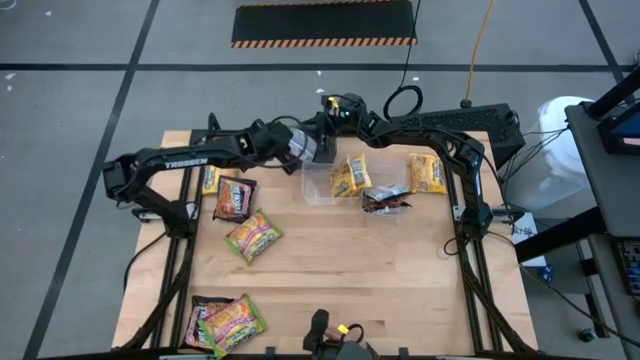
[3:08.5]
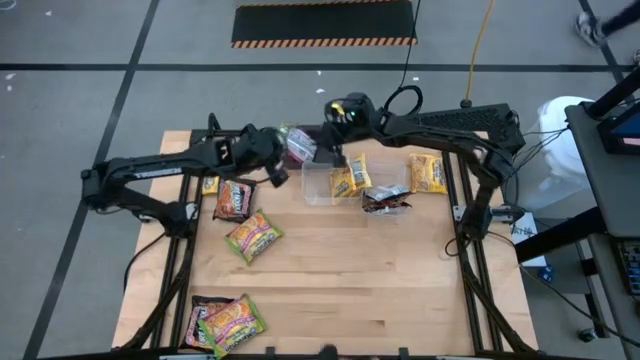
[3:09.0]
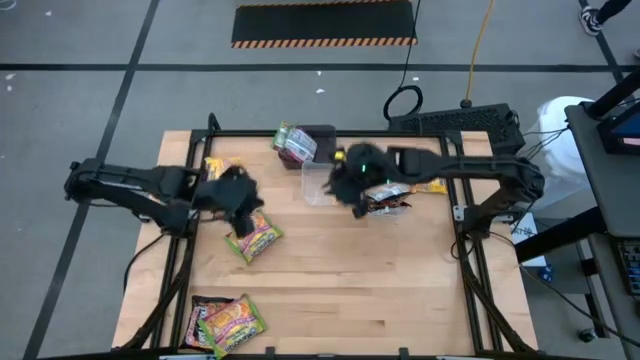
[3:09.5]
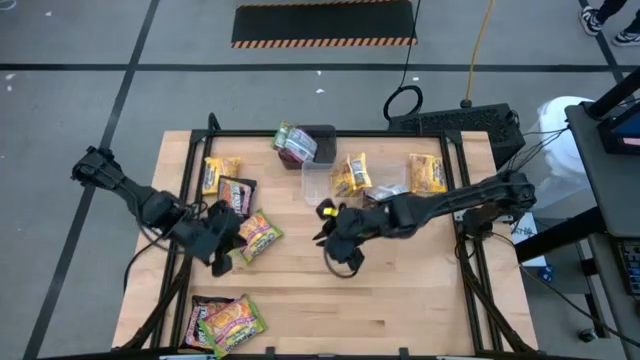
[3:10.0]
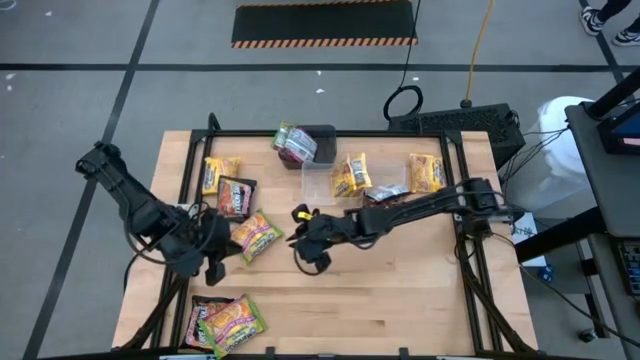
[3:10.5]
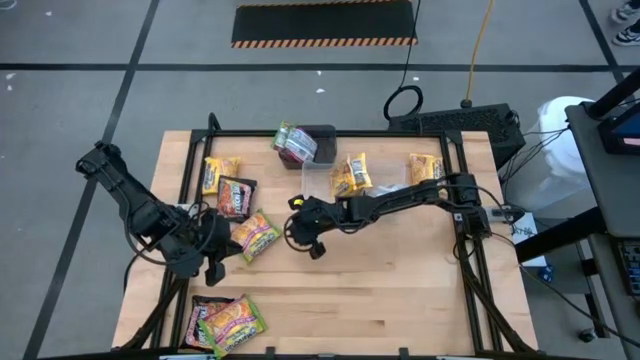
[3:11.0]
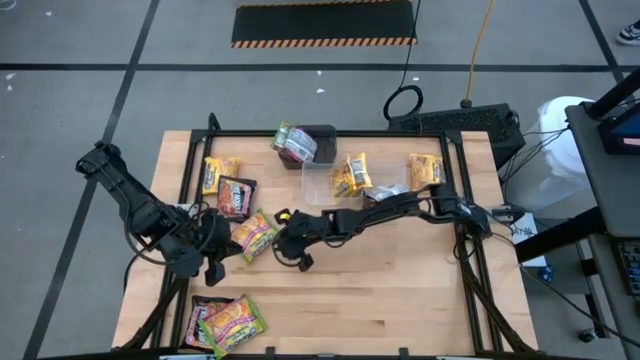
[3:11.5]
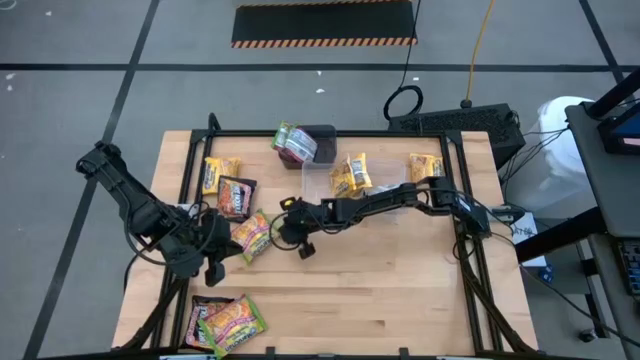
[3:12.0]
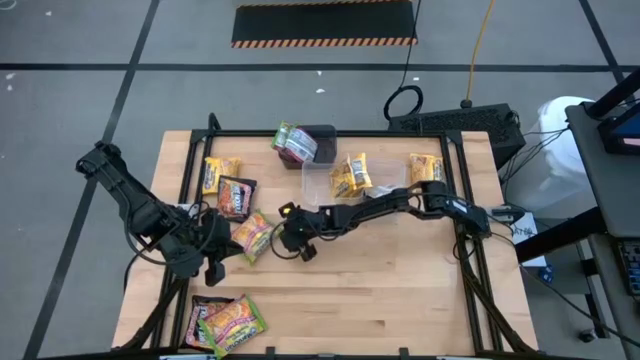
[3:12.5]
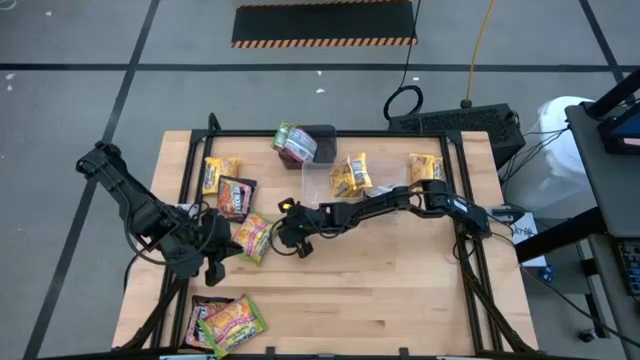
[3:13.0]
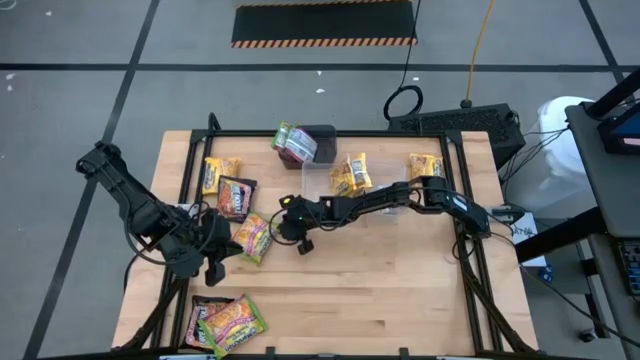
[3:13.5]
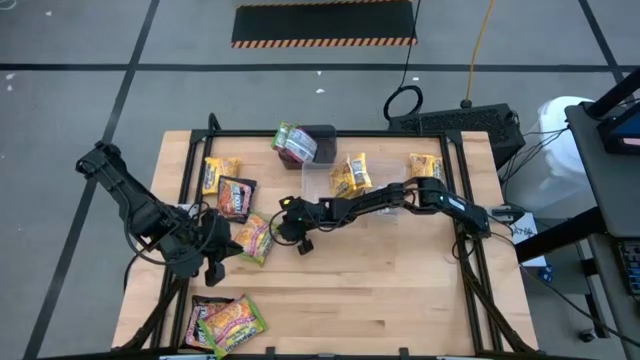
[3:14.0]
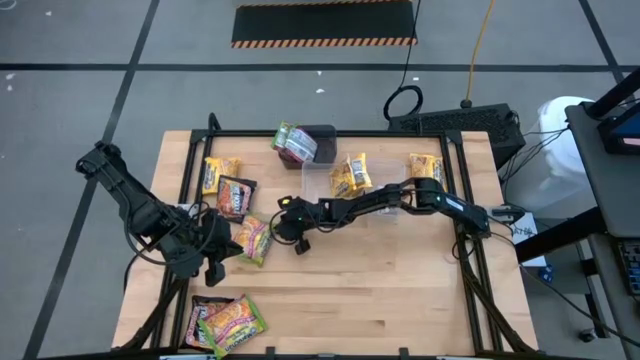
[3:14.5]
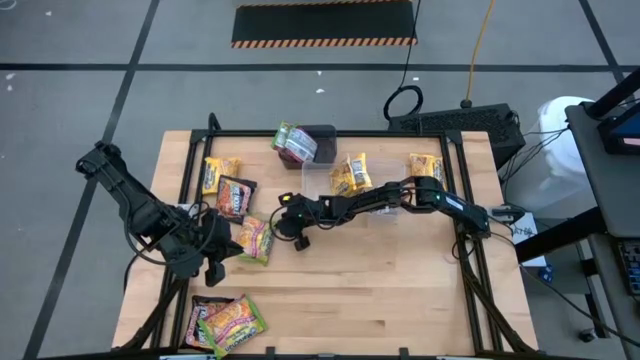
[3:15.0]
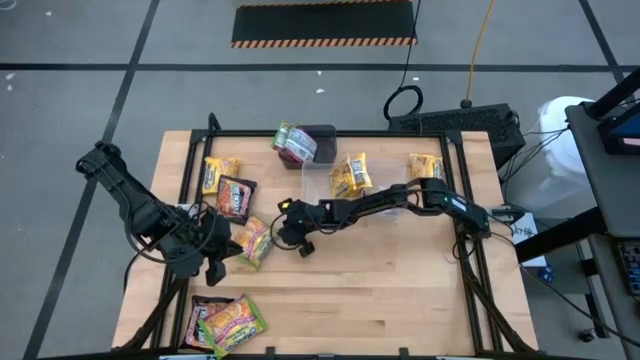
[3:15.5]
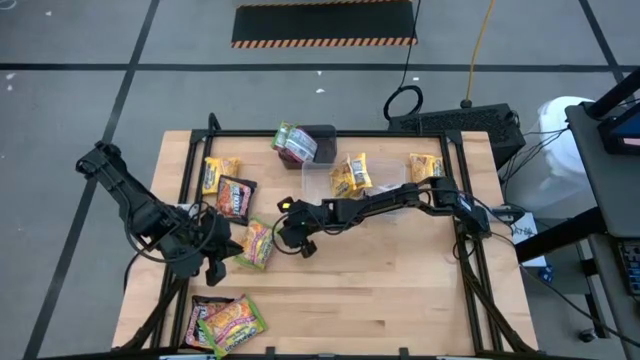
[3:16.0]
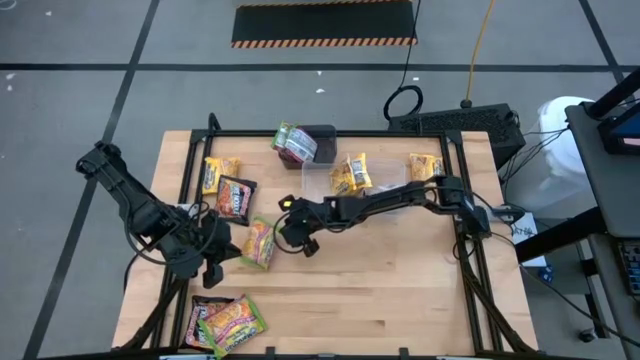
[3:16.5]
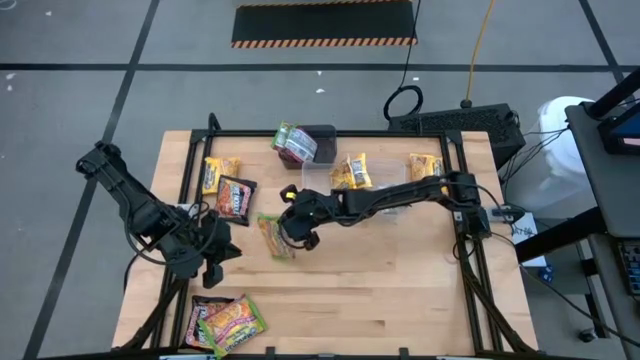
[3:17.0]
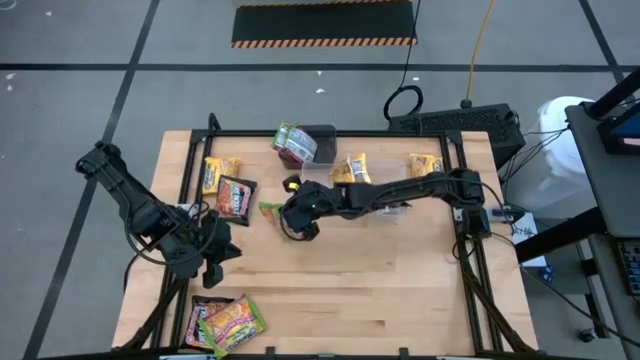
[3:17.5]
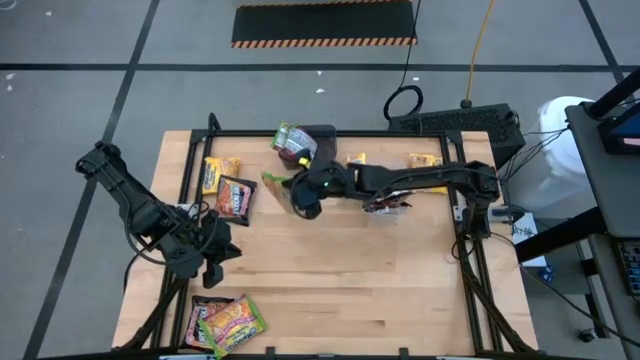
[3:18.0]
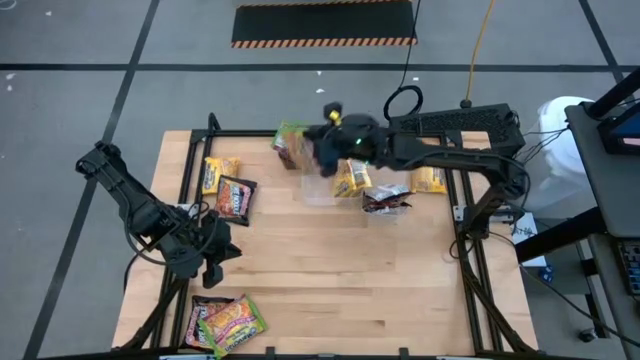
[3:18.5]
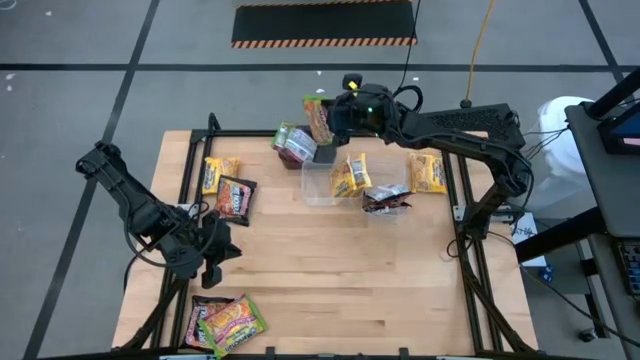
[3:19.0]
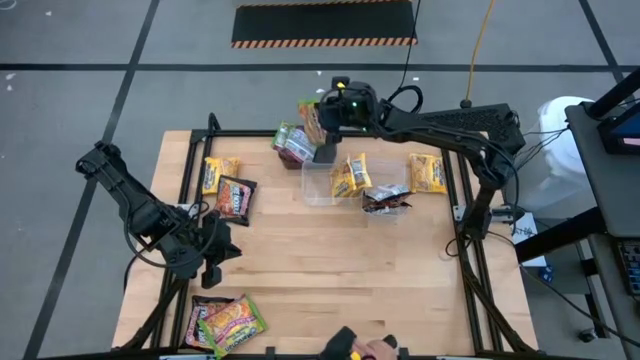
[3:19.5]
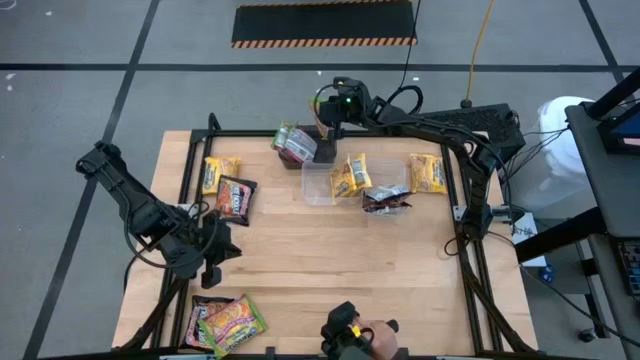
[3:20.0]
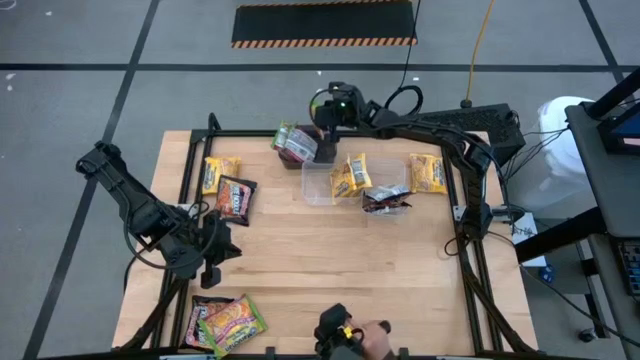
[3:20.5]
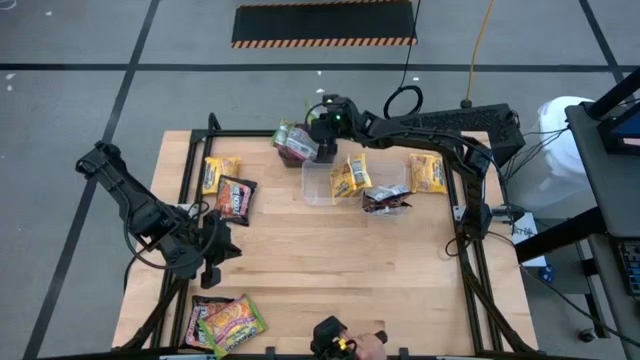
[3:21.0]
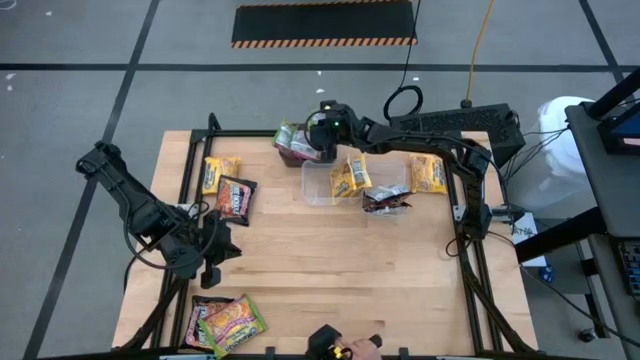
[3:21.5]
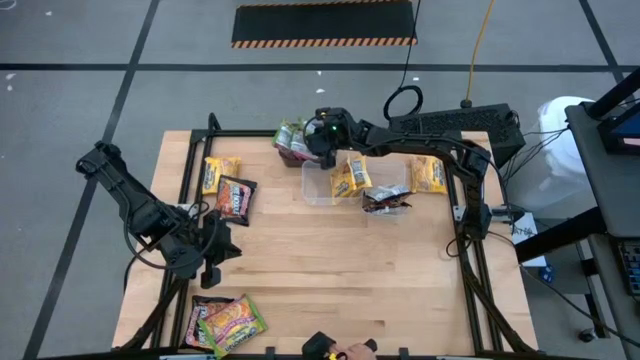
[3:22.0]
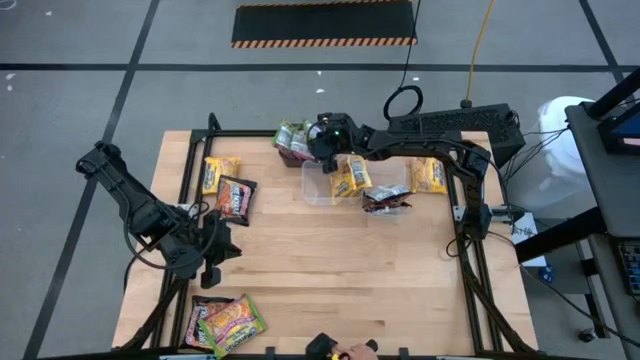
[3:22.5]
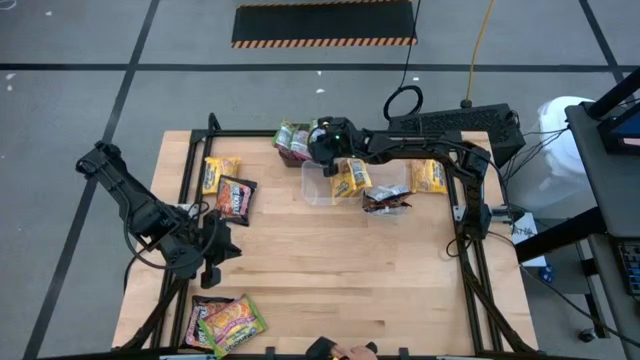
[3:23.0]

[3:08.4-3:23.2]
Task: Sort Maruchan noodles
Put the green noodle pack into the black bin

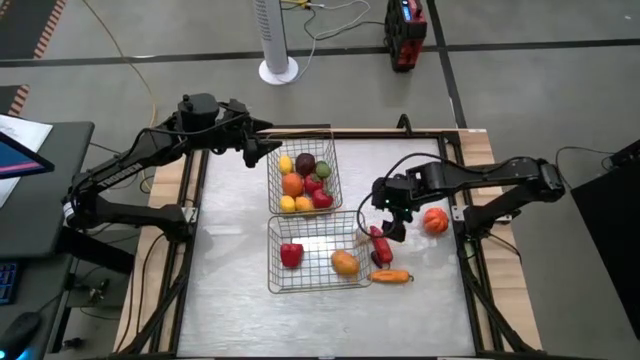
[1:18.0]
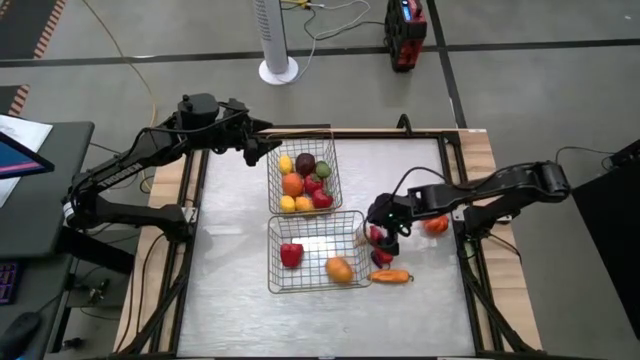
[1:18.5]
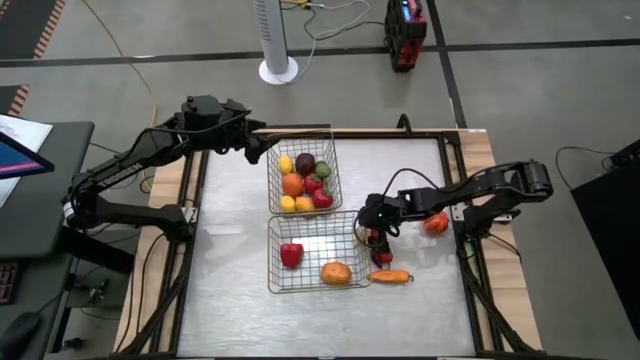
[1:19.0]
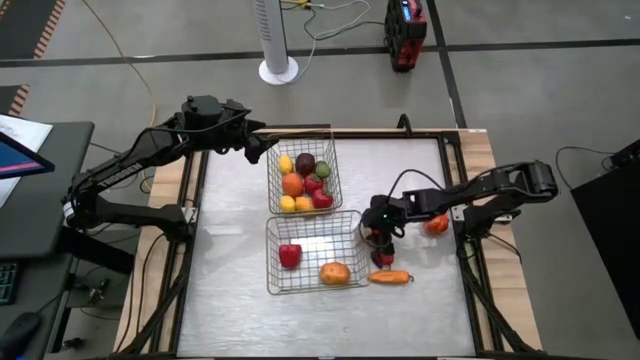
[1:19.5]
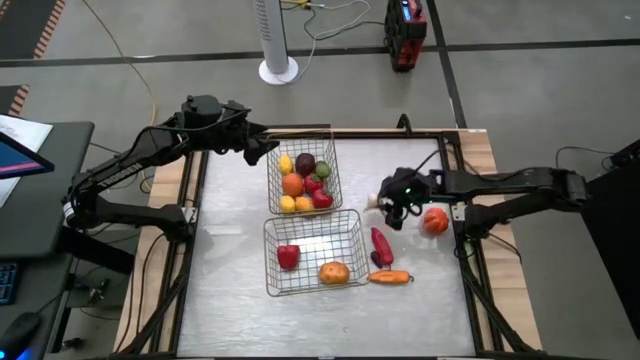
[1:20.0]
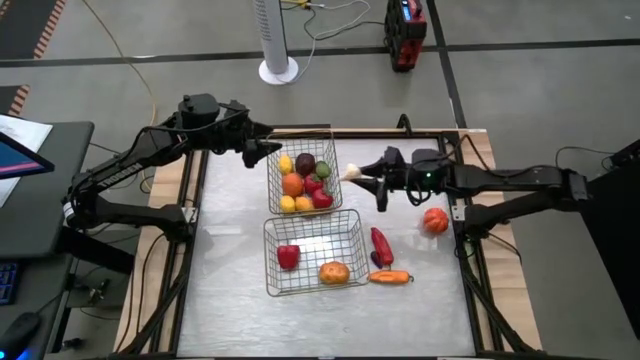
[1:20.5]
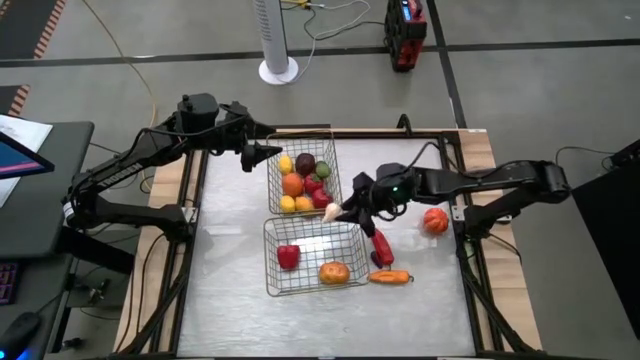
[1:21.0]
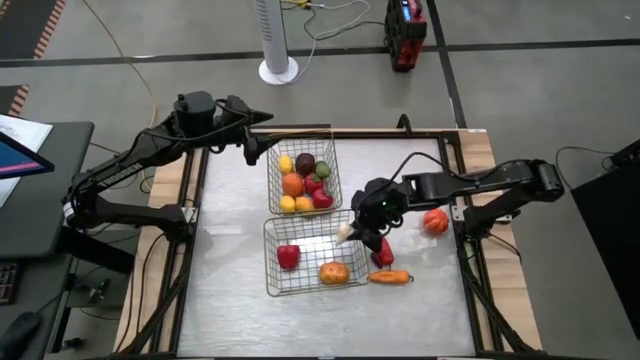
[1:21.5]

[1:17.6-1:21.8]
Task: Sort produce into baskets
Put the white garlic into the bottom wire basket

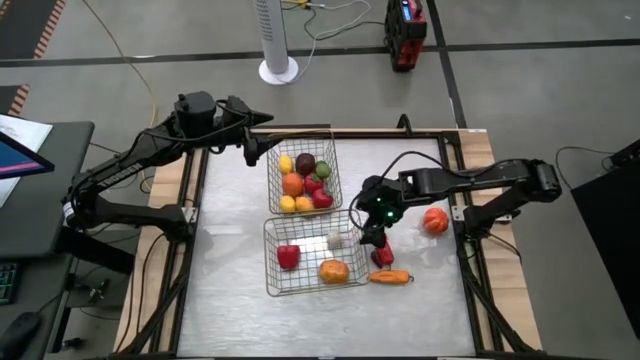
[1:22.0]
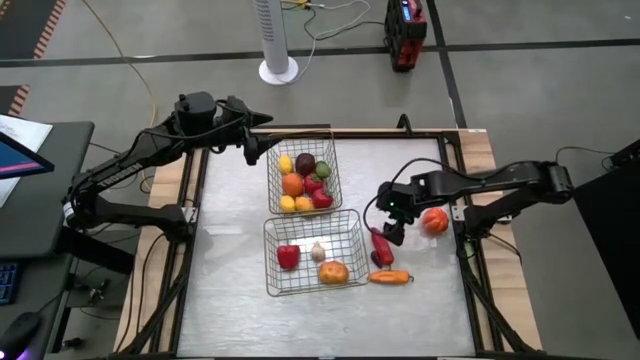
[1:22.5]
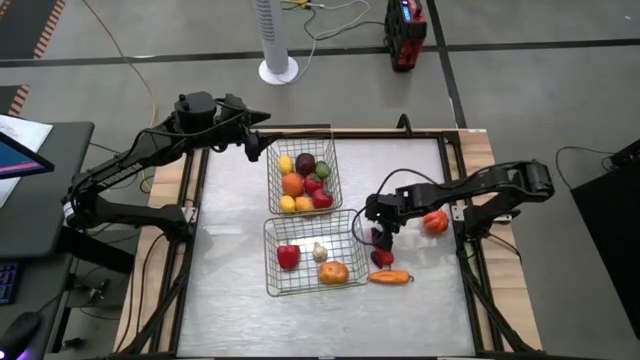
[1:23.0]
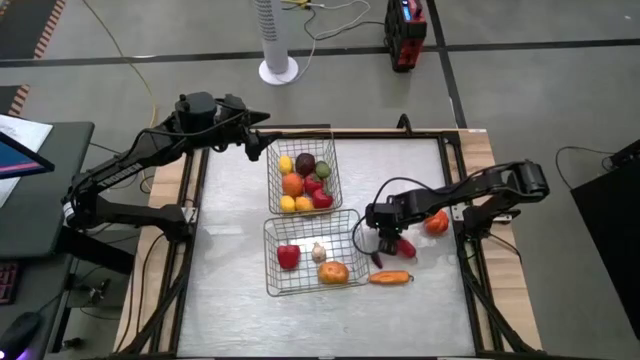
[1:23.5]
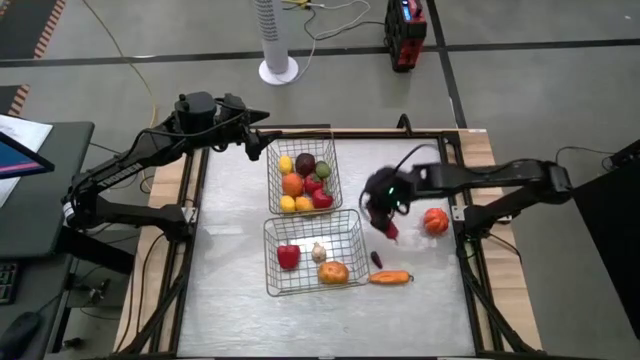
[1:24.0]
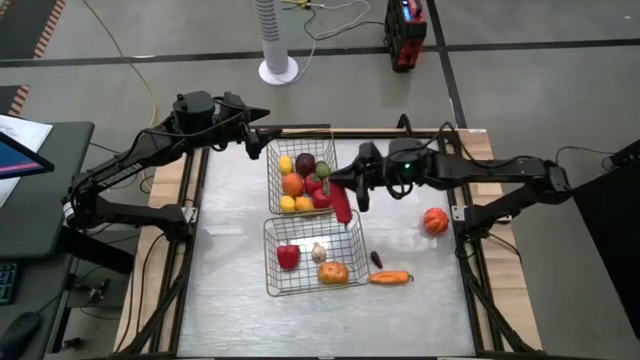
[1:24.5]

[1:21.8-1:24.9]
Put the red chili pepper into the bottom wire basket
